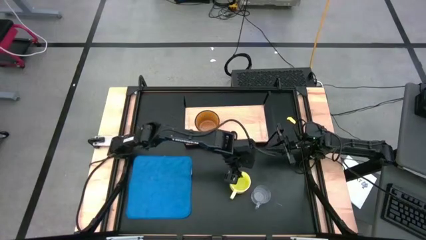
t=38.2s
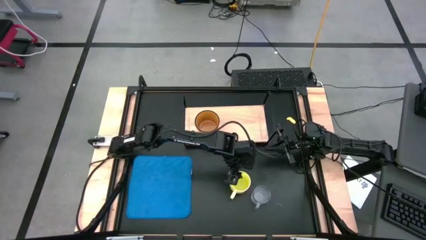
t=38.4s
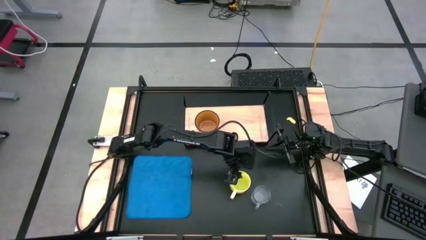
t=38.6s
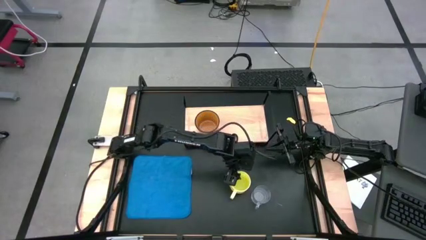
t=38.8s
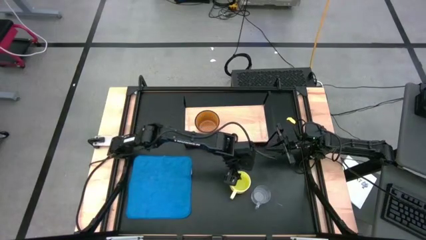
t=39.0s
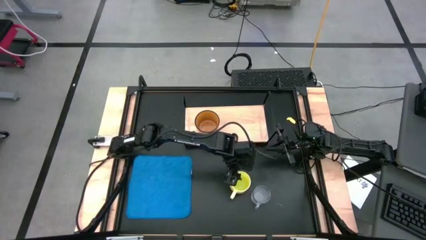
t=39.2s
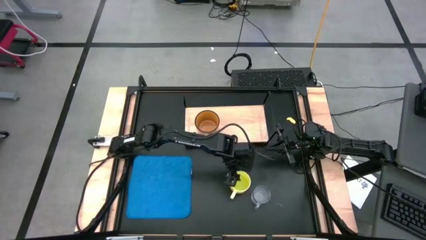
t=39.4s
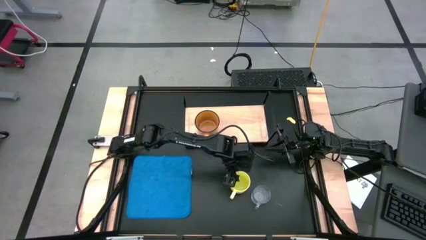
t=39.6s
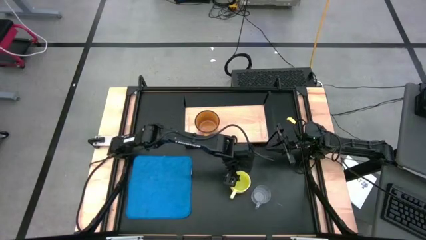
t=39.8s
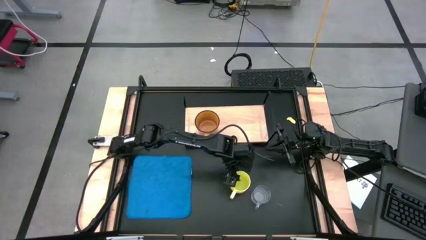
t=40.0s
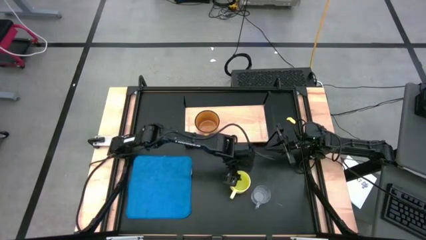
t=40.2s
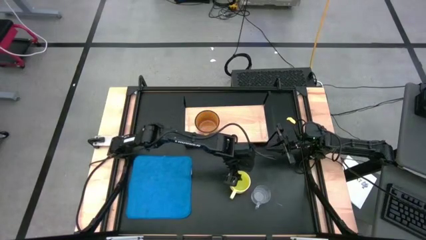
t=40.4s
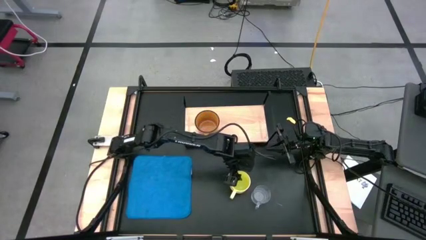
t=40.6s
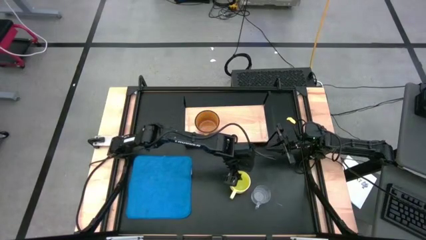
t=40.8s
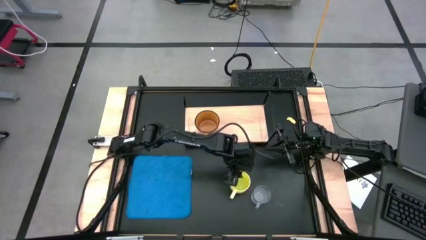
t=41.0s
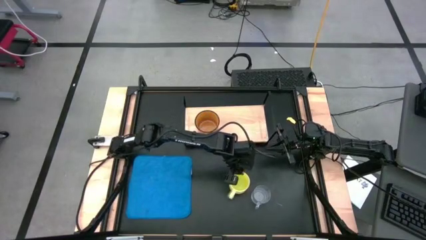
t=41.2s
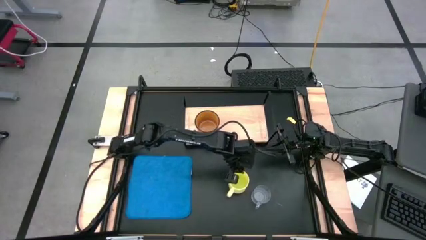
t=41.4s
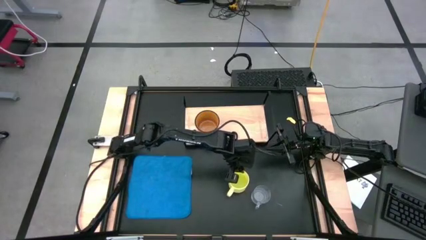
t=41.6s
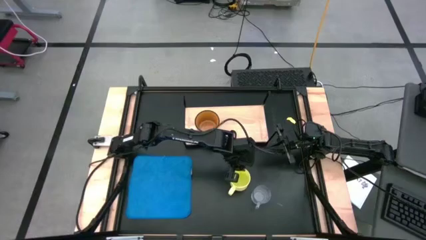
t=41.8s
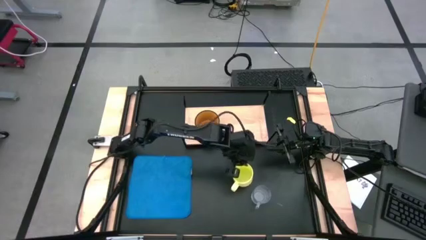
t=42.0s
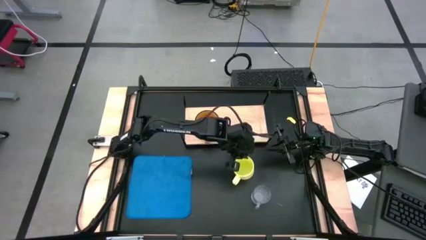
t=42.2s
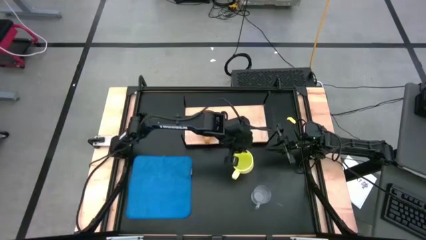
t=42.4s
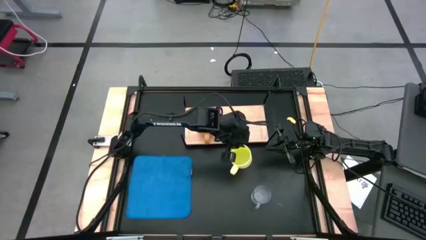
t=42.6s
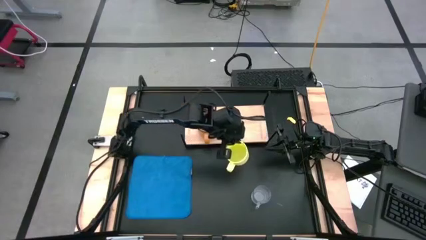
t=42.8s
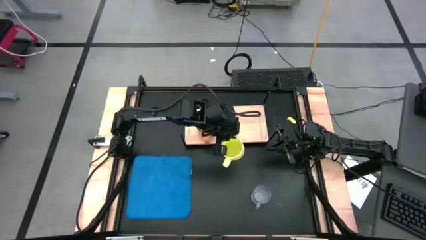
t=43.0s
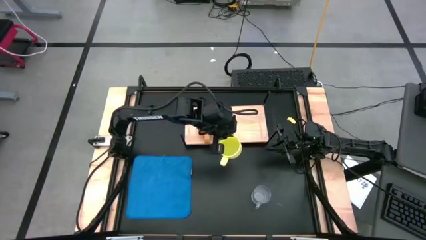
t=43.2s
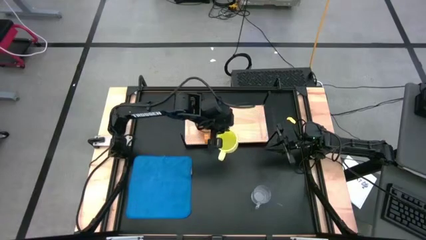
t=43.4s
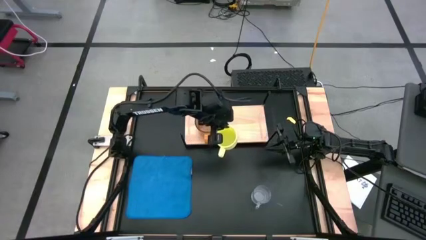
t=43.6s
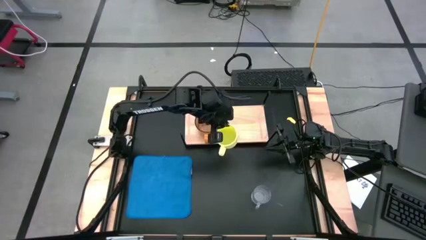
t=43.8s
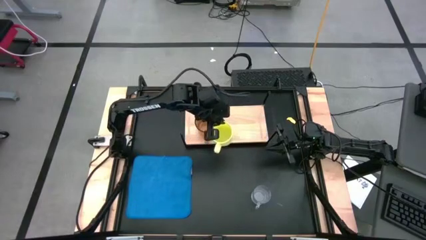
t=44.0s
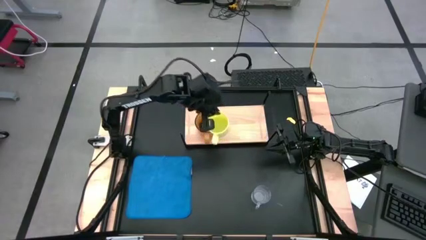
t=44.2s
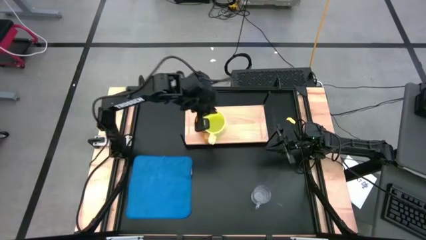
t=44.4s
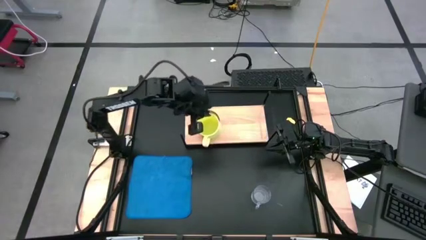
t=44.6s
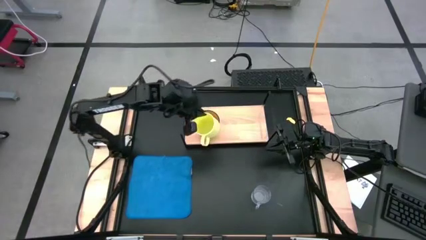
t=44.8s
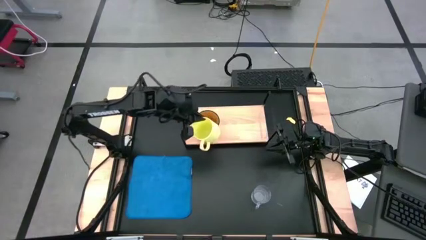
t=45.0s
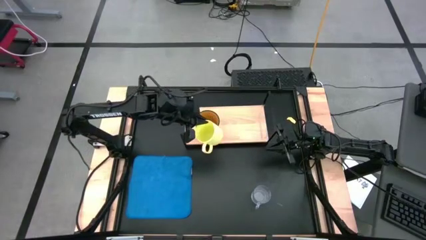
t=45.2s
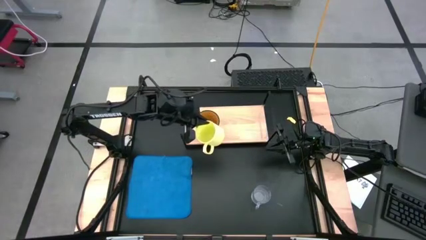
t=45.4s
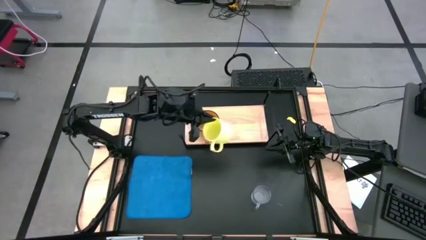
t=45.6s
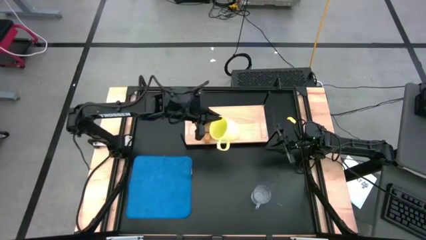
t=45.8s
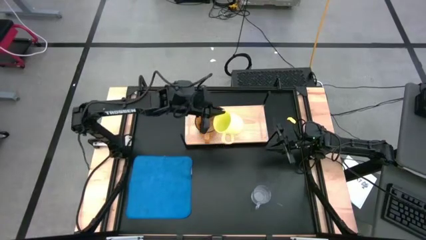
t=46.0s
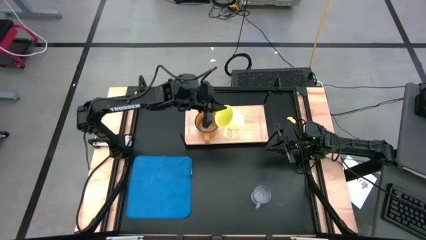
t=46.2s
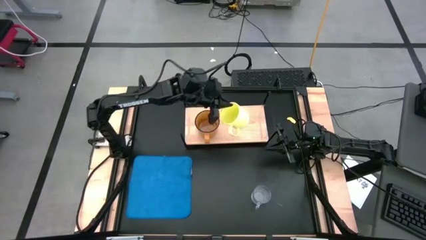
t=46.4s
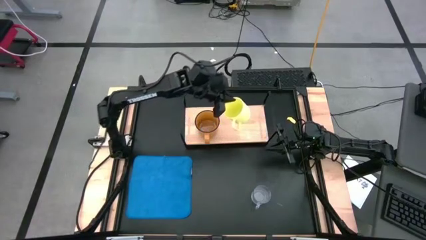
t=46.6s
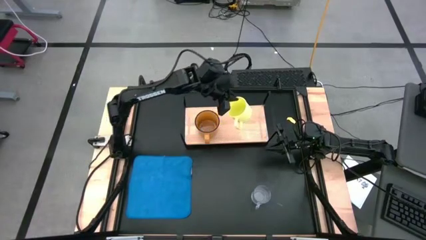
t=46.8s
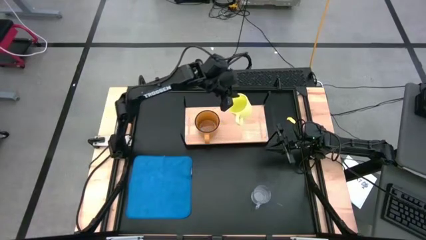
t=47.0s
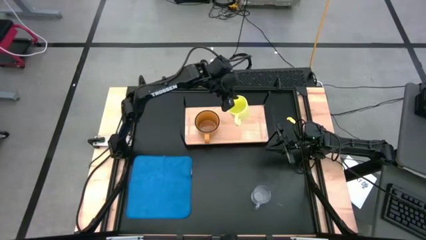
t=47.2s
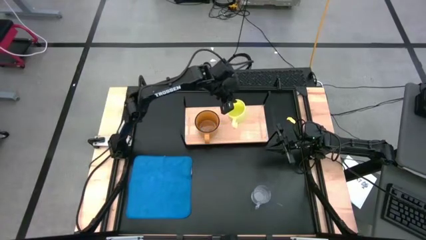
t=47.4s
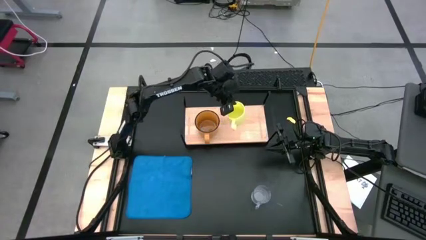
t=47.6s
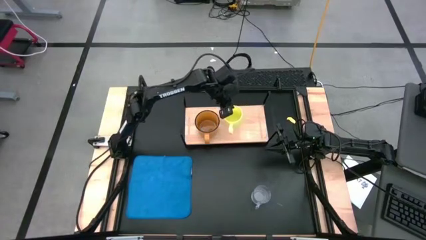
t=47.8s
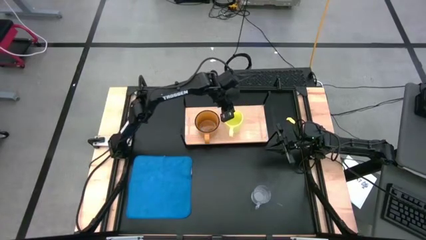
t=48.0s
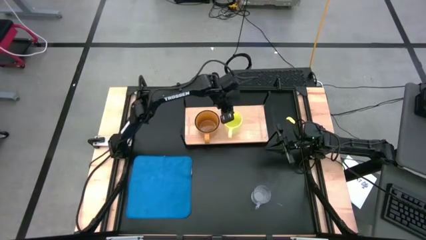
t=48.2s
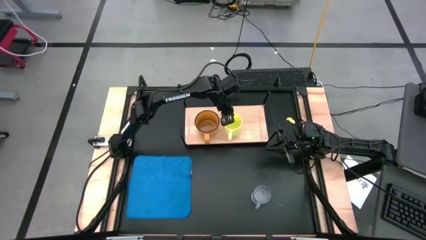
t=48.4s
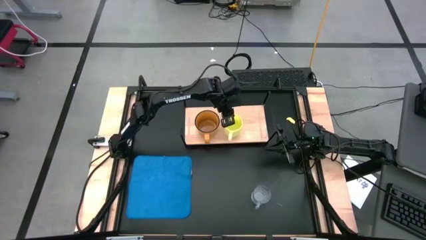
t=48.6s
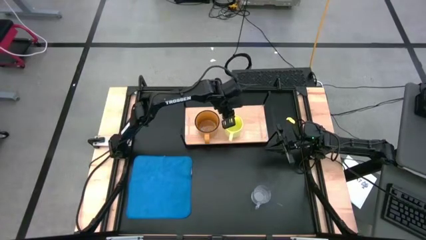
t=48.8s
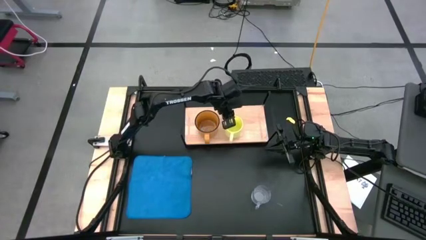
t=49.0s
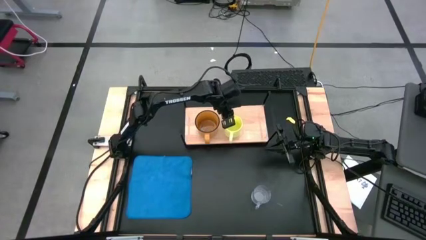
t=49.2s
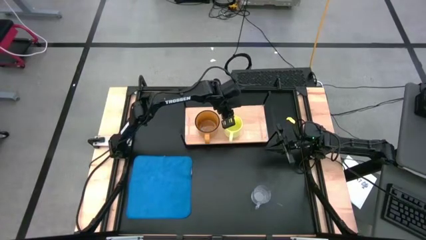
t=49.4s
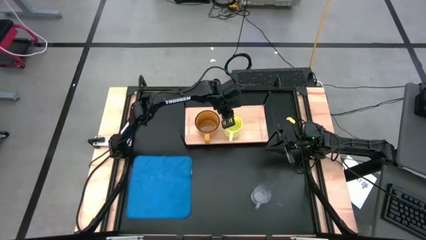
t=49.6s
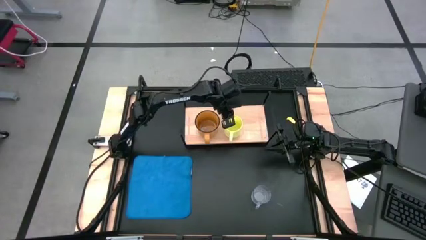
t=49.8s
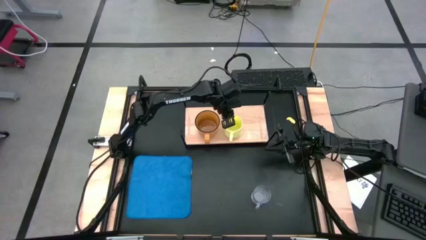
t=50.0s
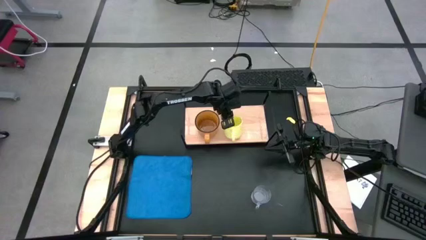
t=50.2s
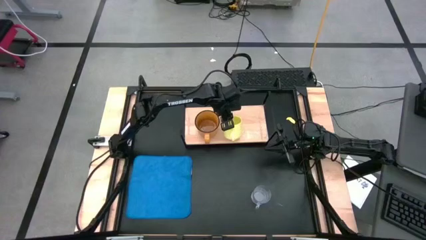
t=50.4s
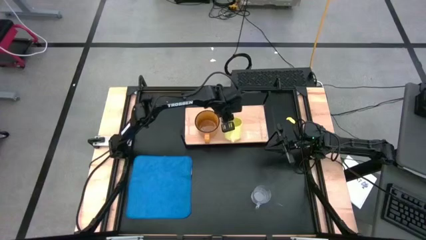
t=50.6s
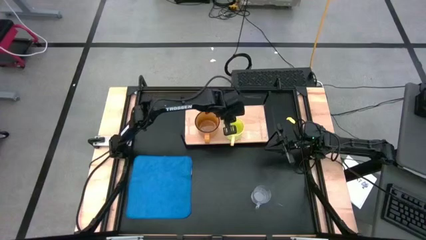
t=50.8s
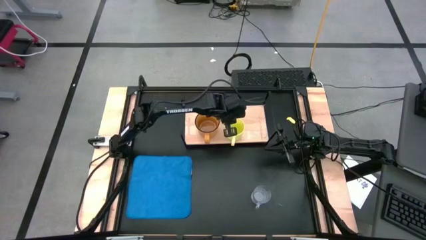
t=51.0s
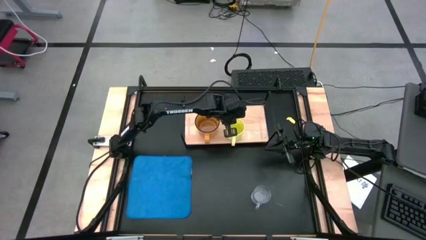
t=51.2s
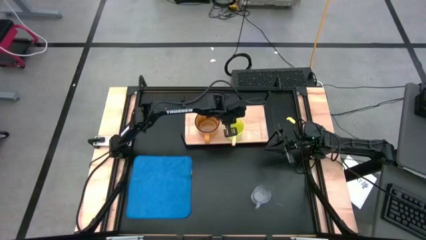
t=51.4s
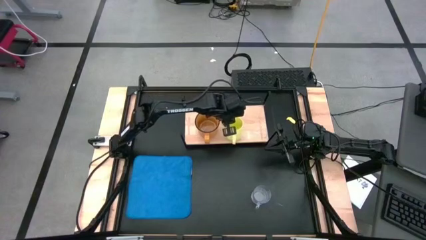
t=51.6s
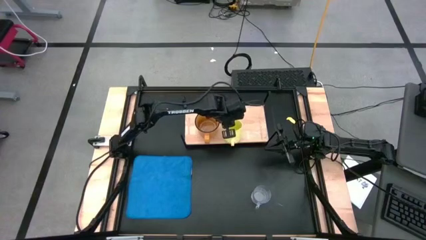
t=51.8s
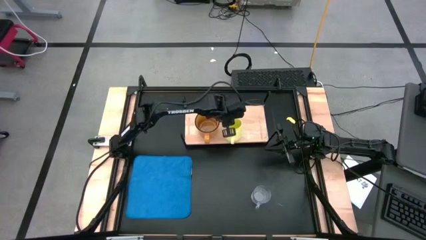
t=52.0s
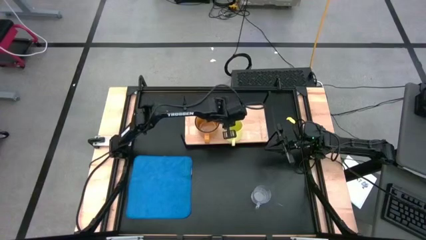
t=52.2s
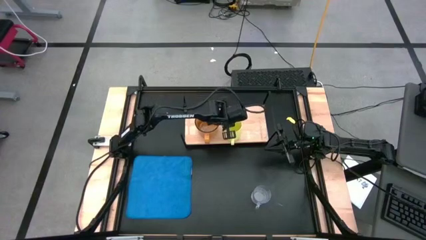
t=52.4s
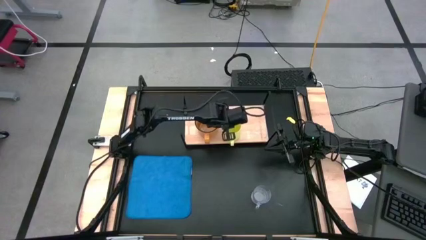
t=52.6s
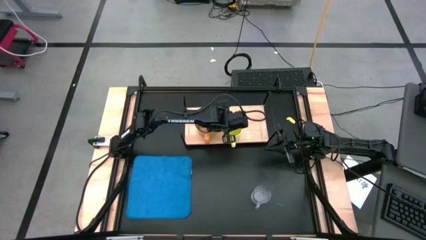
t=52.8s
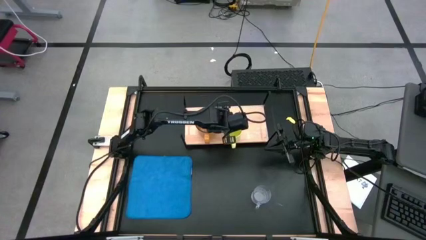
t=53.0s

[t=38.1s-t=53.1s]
Task: Stack small to large cups/mugs on shelf
Put the yellow mug on the shelf
